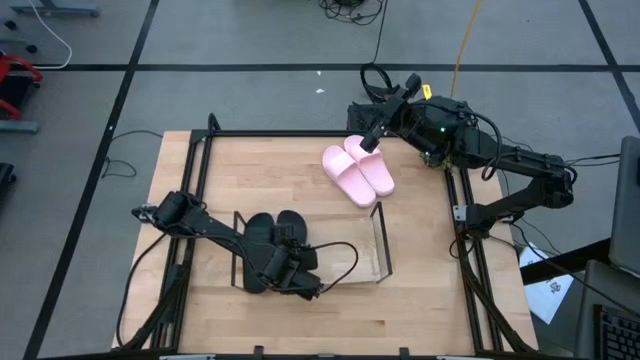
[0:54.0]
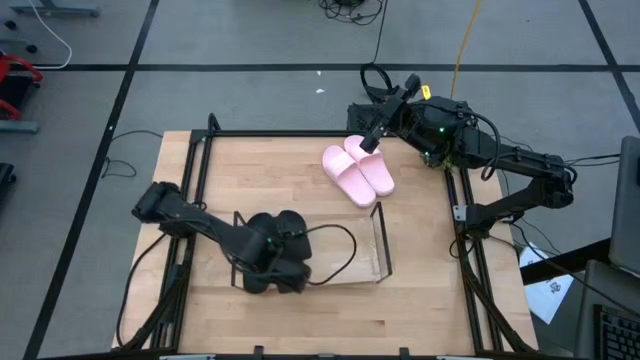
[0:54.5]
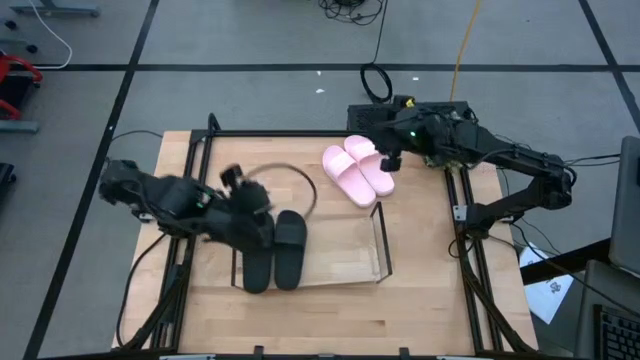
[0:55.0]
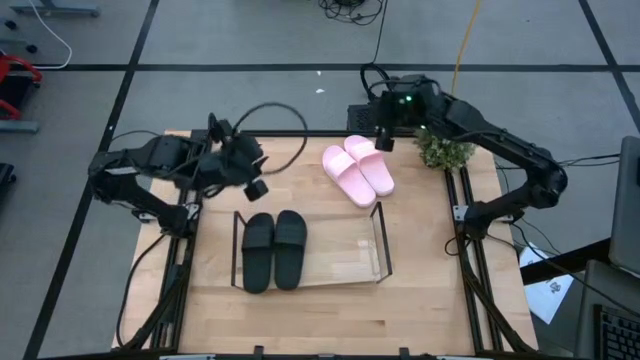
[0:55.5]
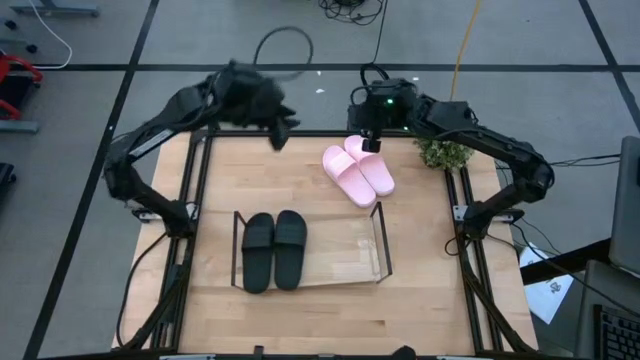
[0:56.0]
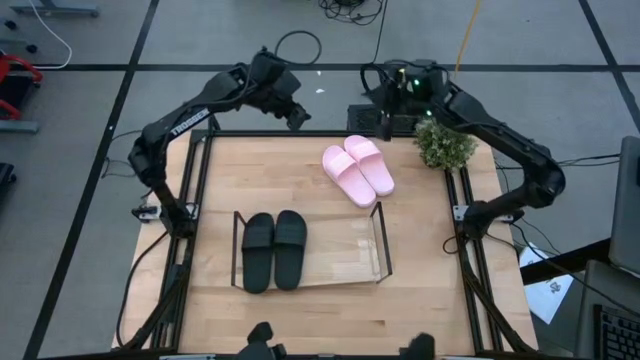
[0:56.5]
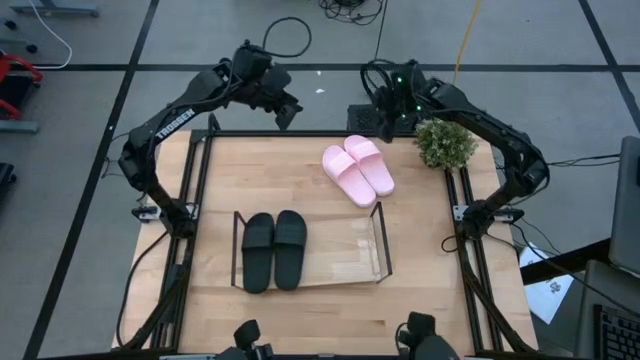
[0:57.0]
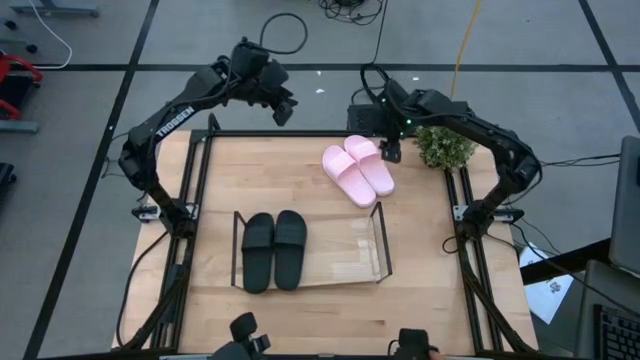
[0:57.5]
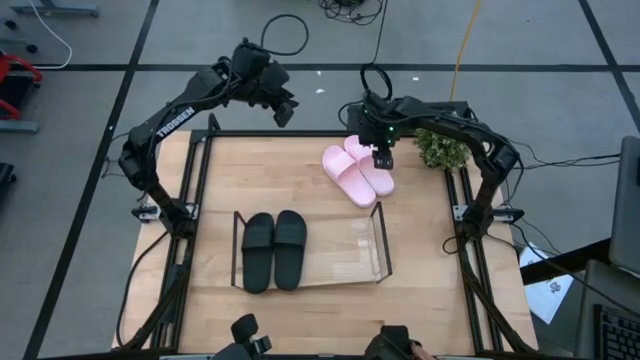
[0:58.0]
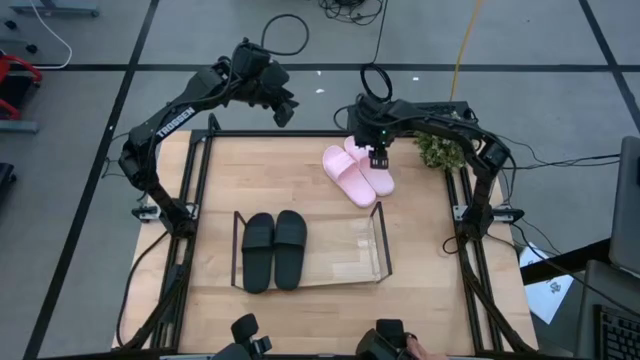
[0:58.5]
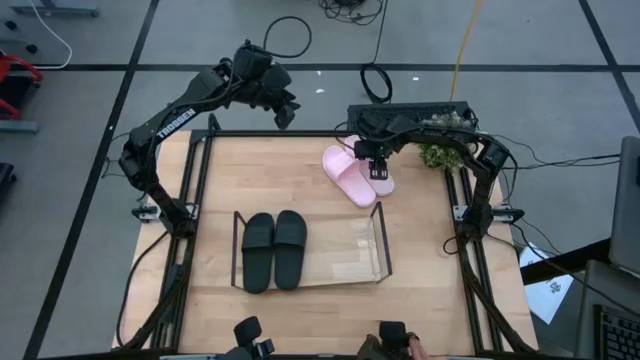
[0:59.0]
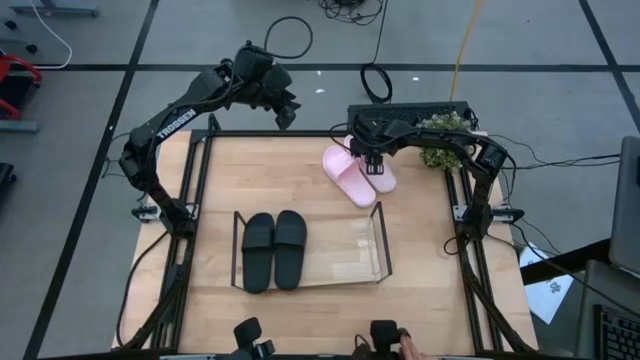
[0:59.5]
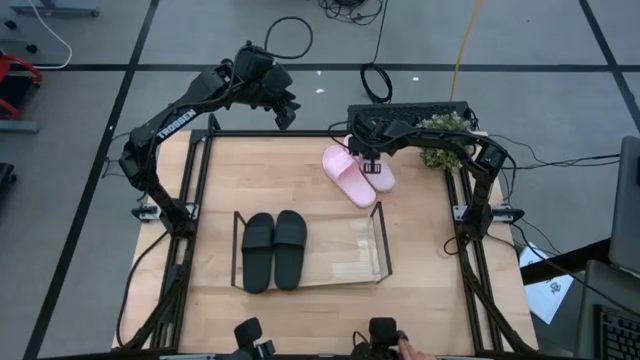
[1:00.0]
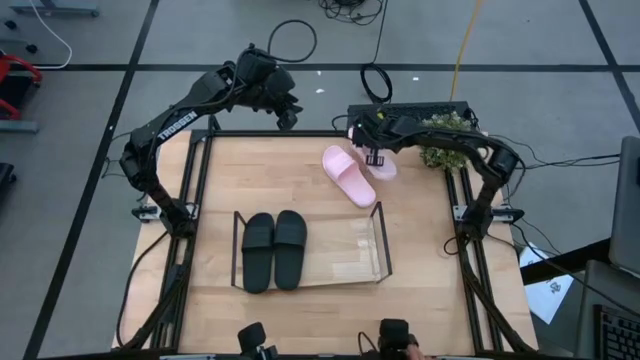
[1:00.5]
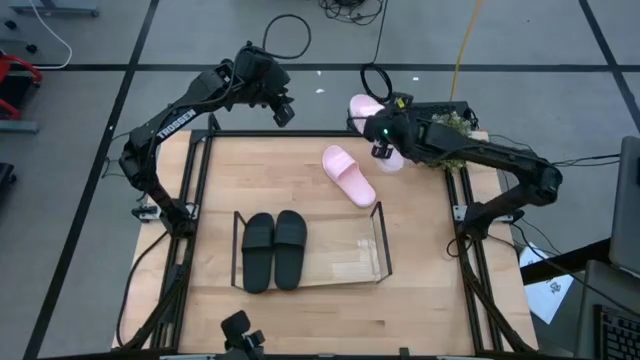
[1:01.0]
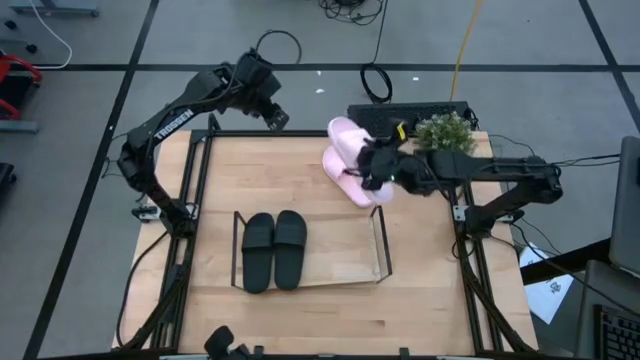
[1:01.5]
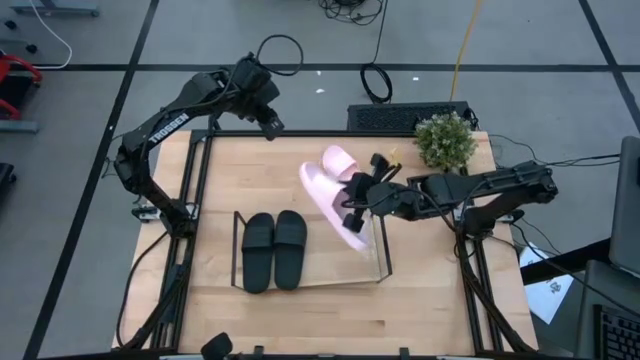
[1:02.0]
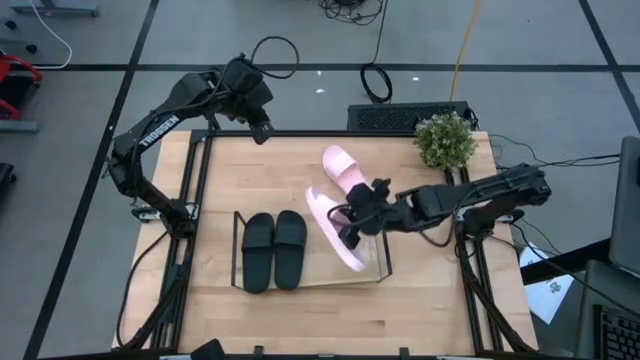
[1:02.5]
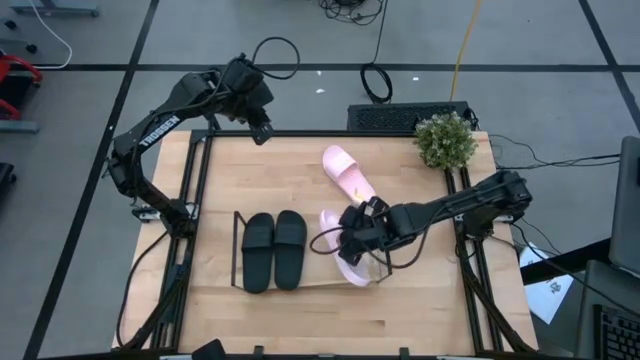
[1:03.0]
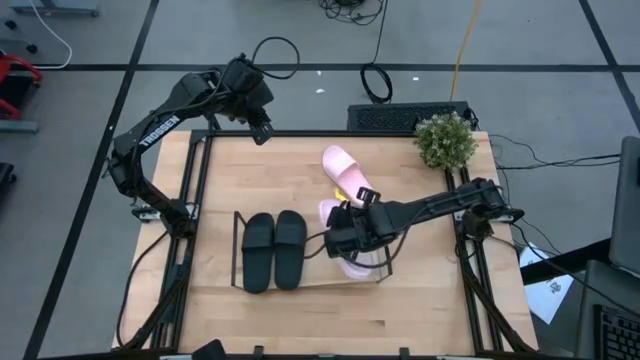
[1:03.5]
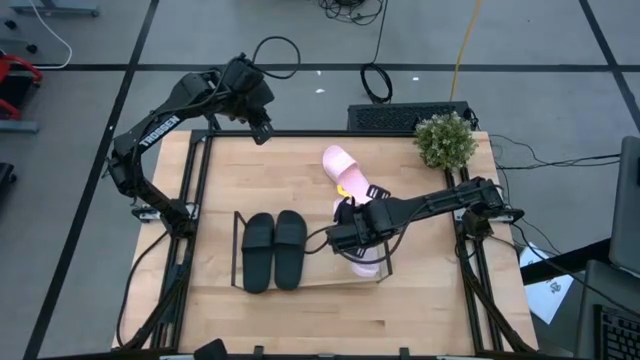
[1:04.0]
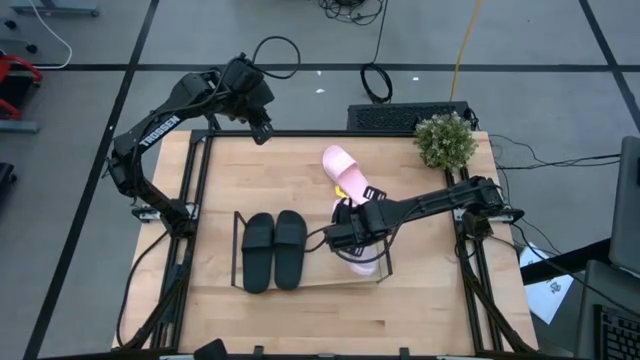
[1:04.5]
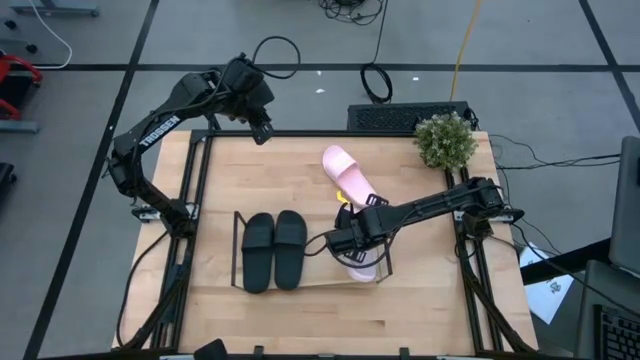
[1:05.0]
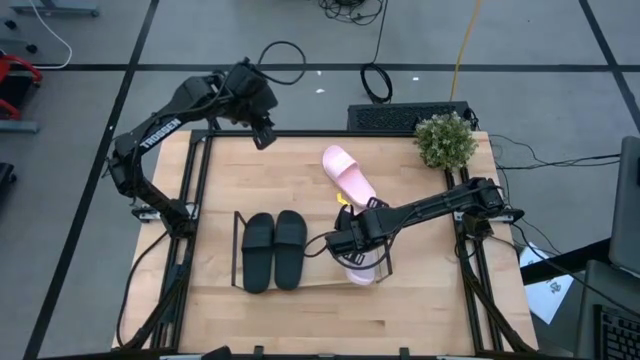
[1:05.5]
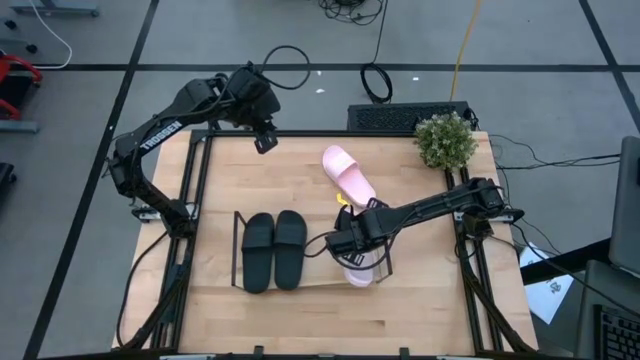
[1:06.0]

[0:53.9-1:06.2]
Task: Pick and place slides into the shelf
Put the right pink slides on the shelf

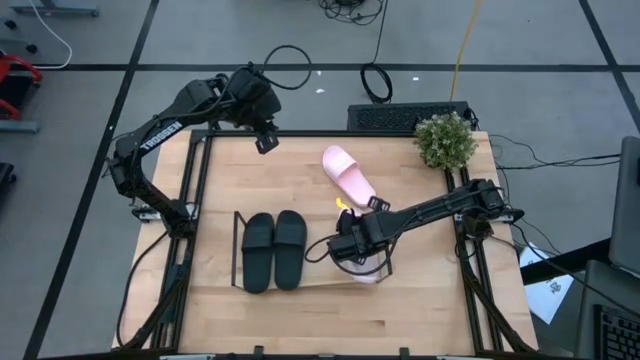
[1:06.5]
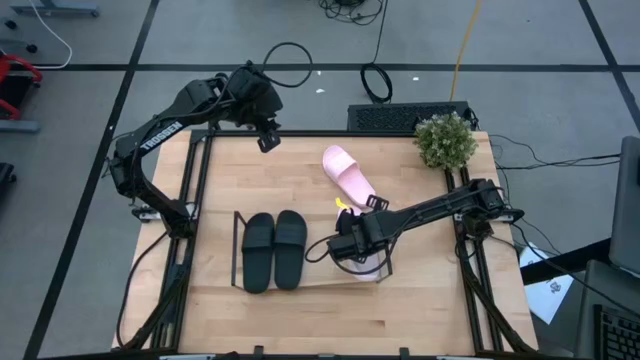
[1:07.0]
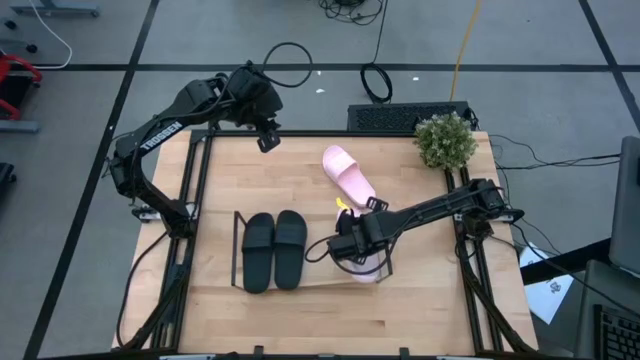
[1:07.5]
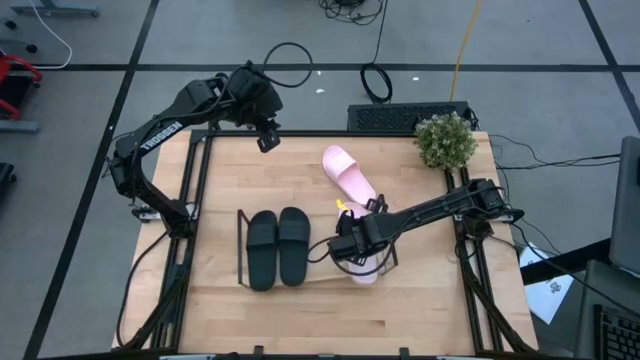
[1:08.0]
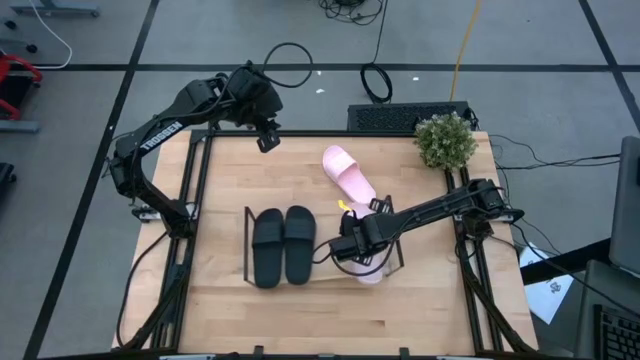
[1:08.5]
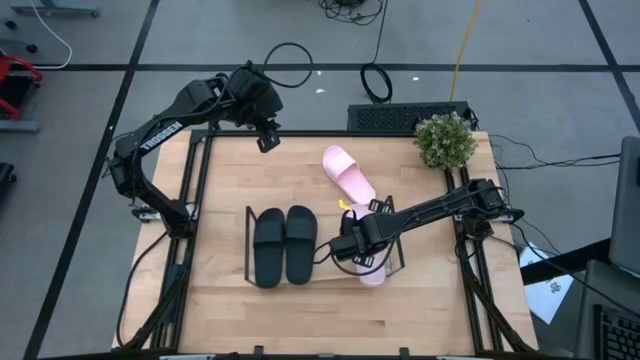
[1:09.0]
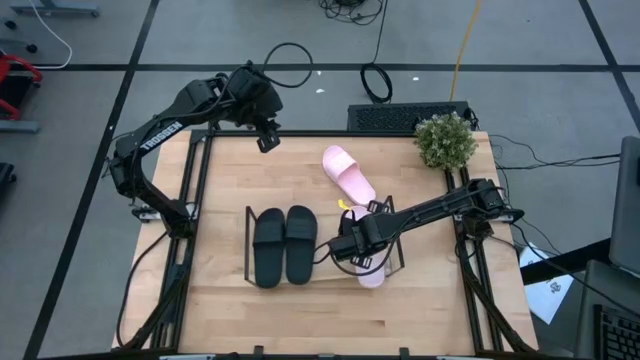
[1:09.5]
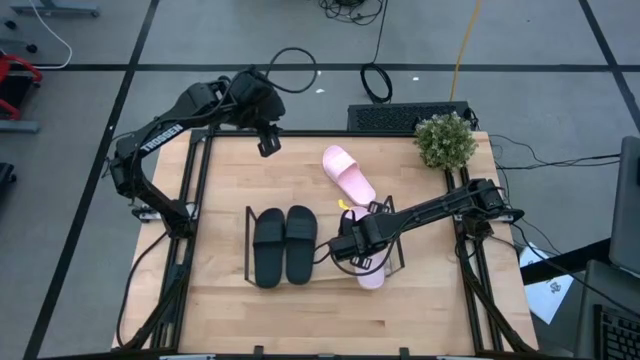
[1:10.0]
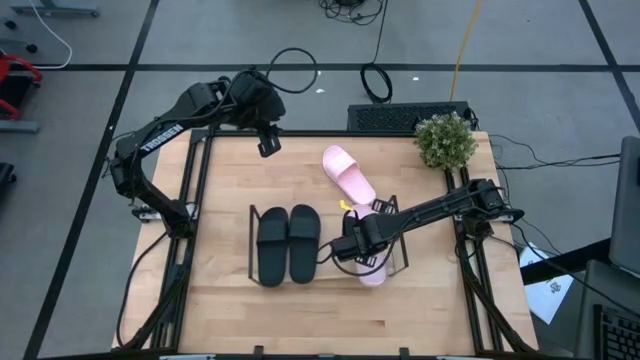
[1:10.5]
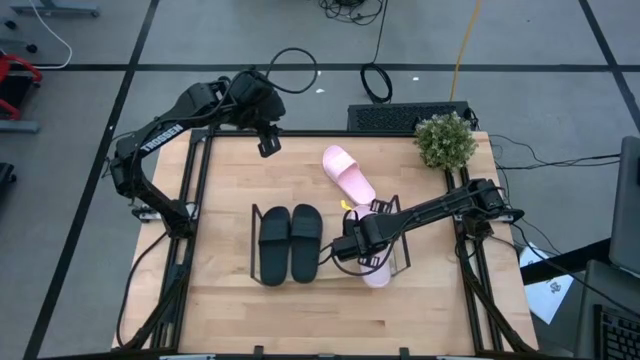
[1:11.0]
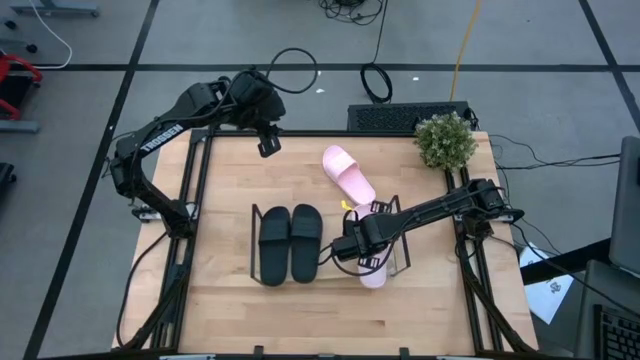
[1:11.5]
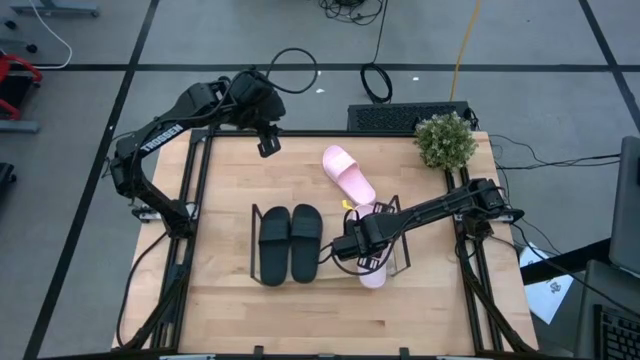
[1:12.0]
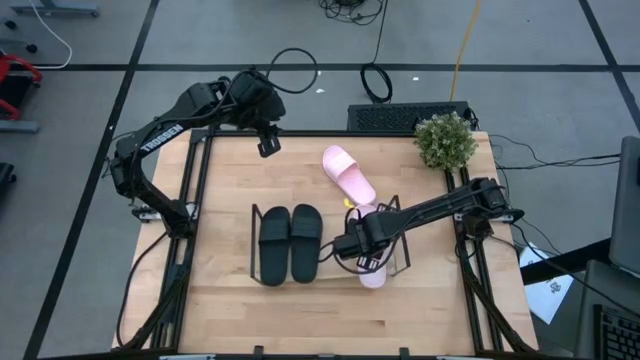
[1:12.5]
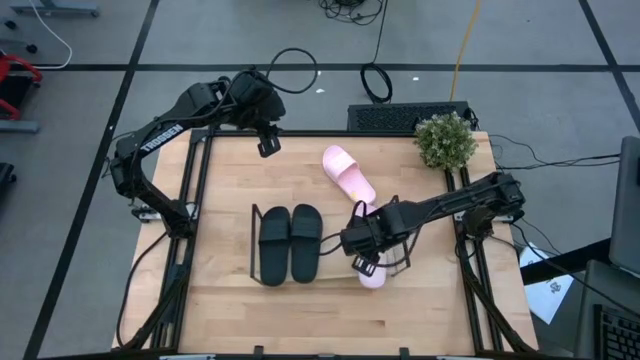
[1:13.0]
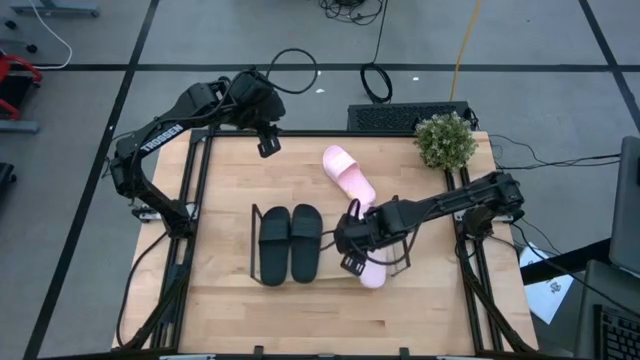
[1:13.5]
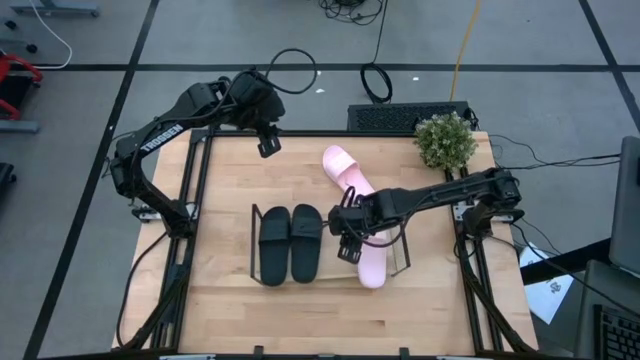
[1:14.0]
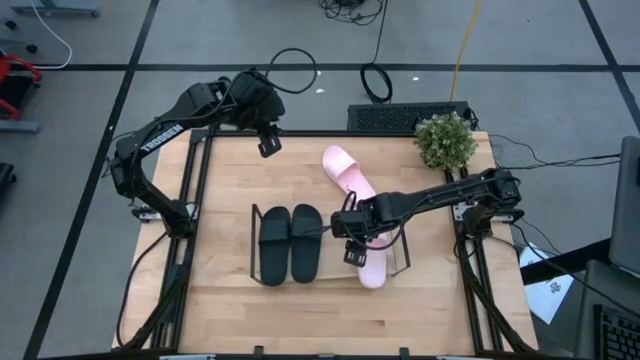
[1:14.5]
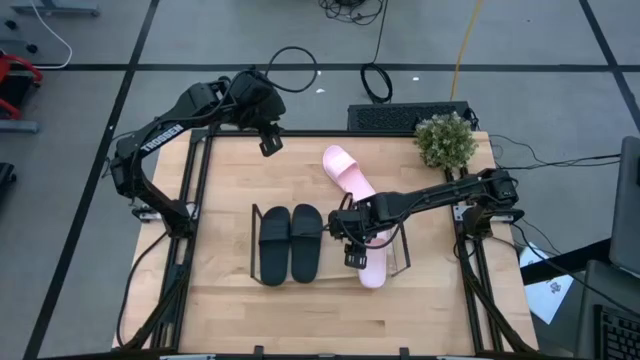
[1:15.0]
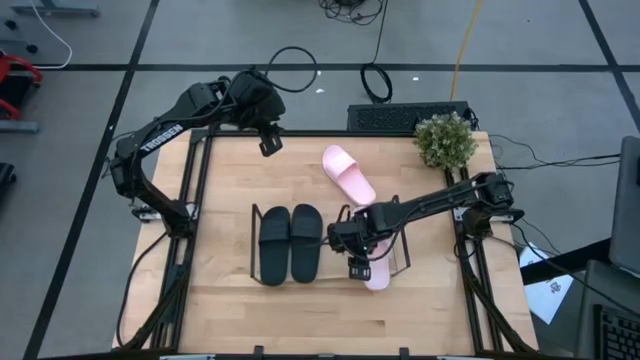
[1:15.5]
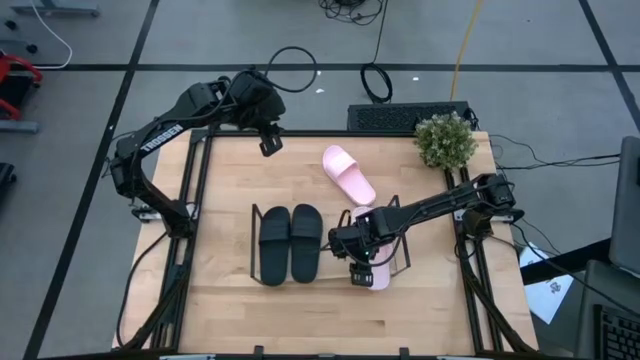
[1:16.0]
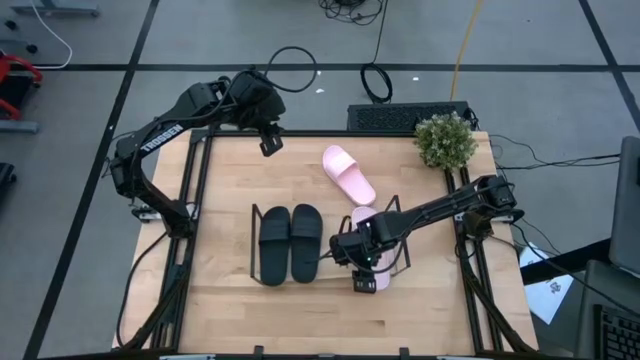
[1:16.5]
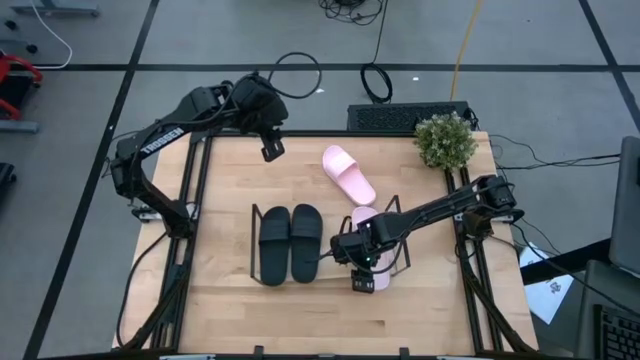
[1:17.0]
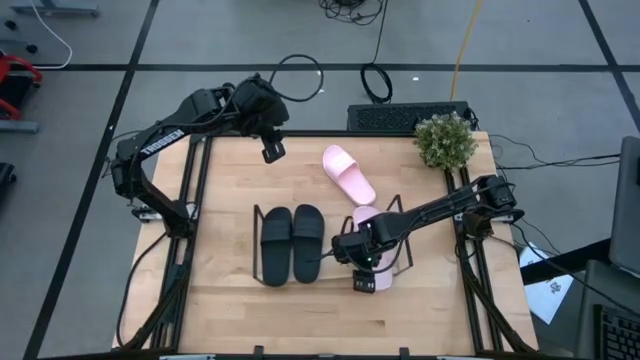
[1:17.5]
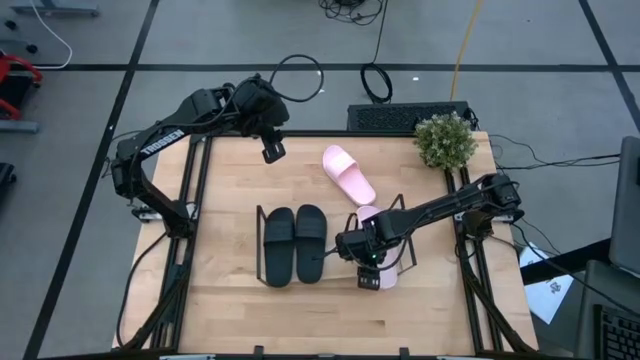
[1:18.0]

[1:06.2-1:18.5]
Put the right pink slides on the shelf
